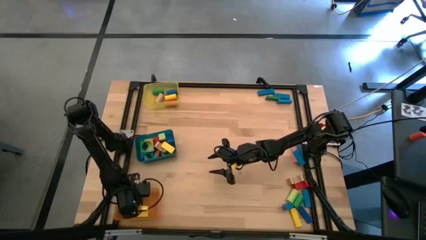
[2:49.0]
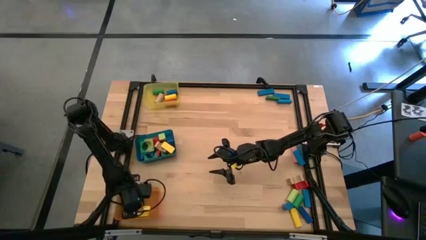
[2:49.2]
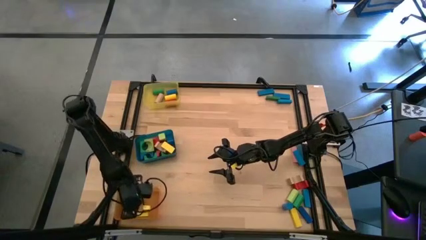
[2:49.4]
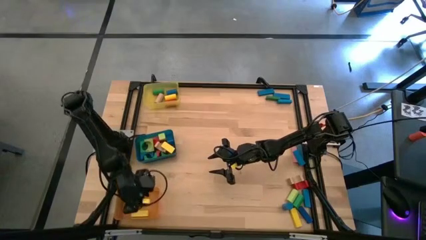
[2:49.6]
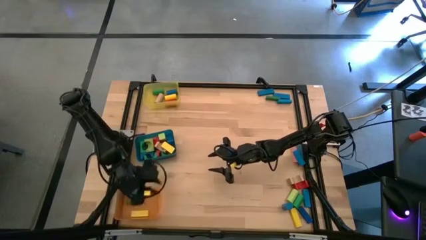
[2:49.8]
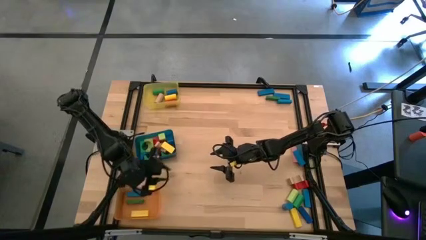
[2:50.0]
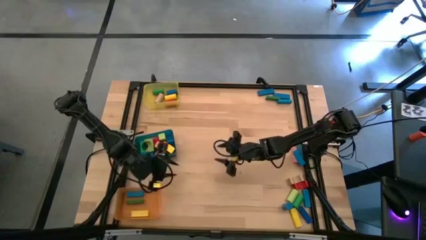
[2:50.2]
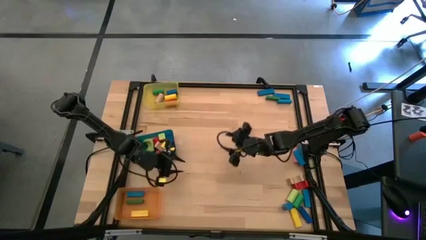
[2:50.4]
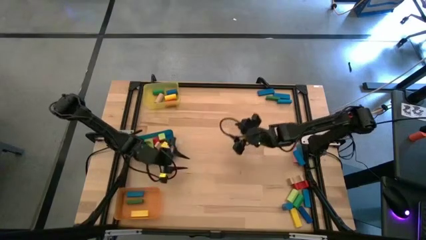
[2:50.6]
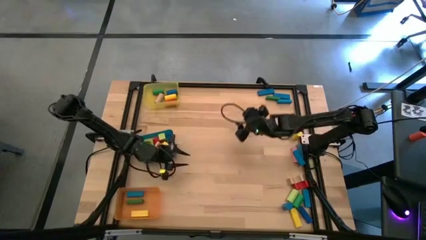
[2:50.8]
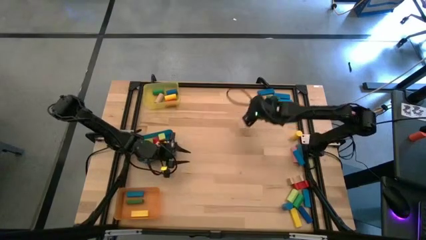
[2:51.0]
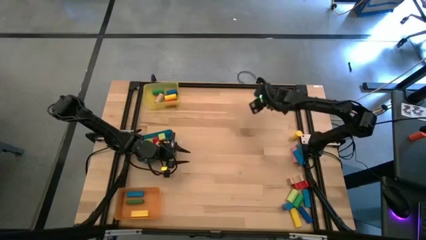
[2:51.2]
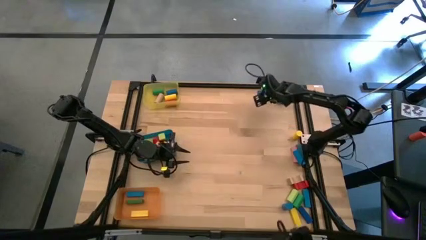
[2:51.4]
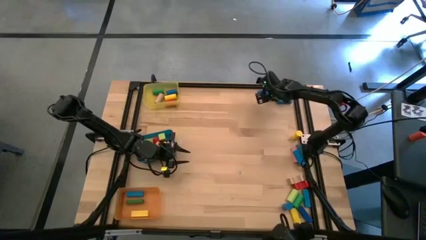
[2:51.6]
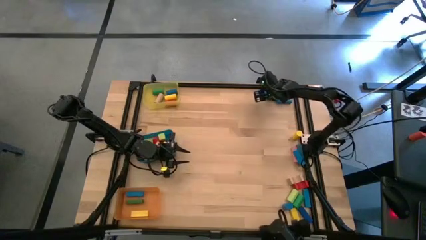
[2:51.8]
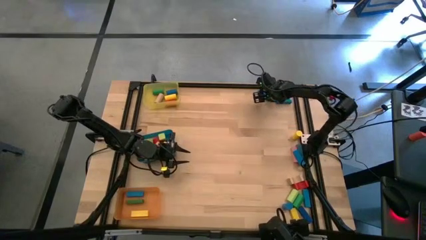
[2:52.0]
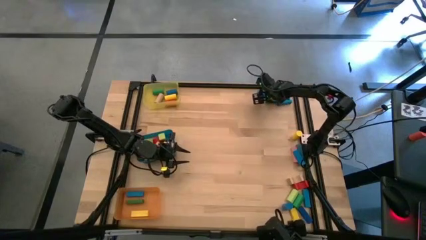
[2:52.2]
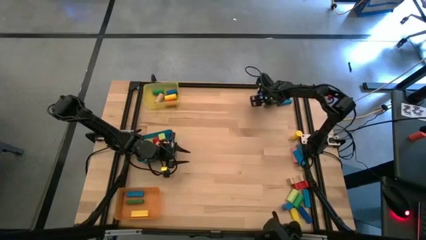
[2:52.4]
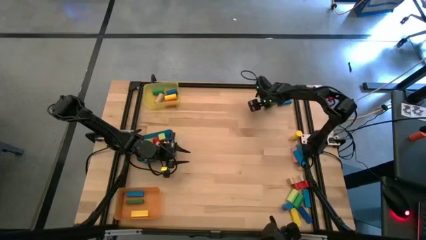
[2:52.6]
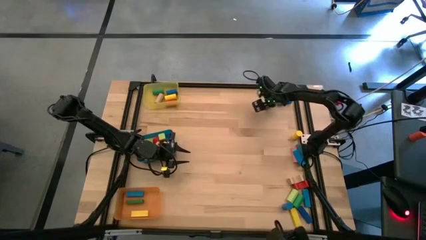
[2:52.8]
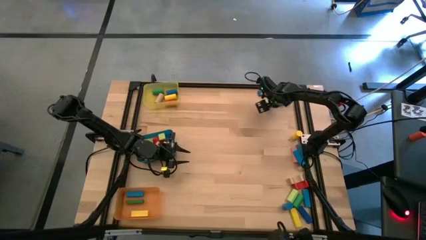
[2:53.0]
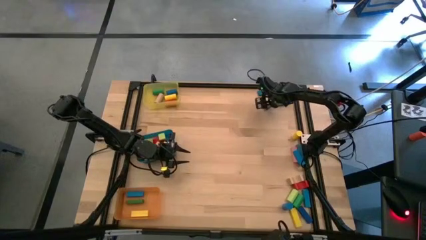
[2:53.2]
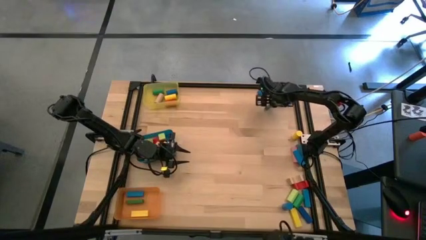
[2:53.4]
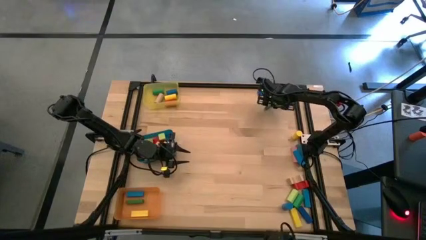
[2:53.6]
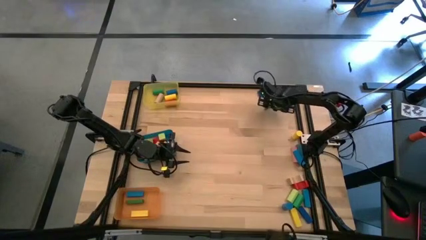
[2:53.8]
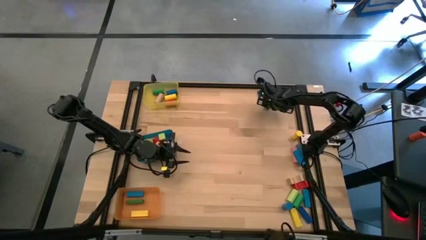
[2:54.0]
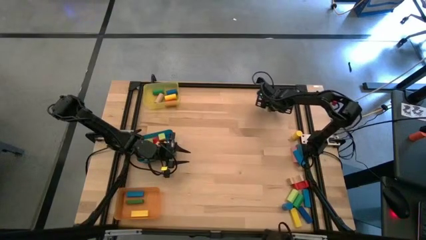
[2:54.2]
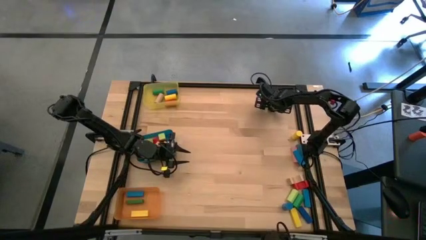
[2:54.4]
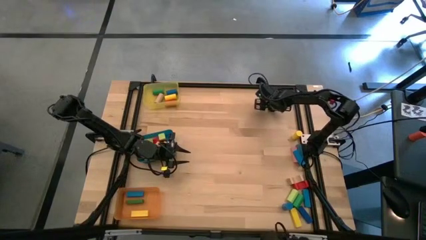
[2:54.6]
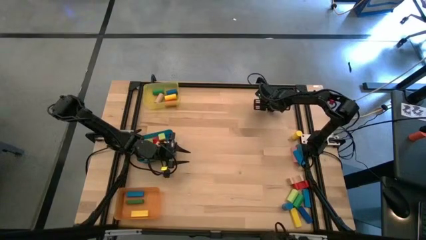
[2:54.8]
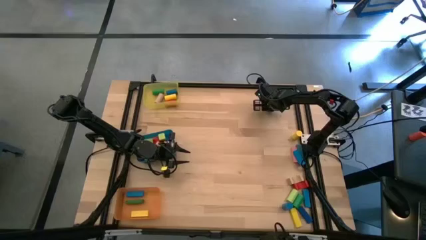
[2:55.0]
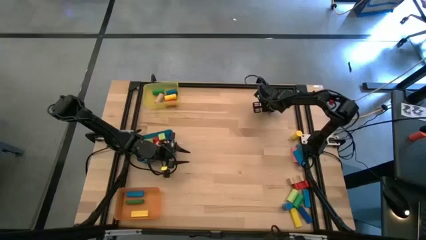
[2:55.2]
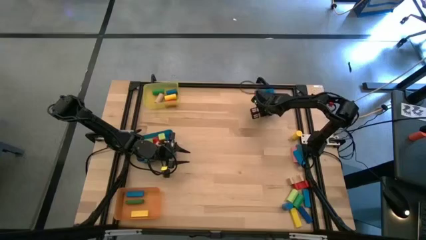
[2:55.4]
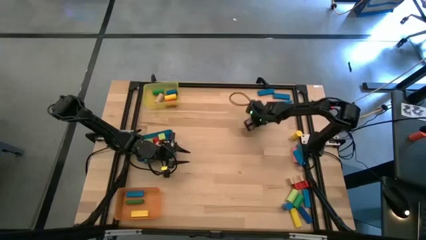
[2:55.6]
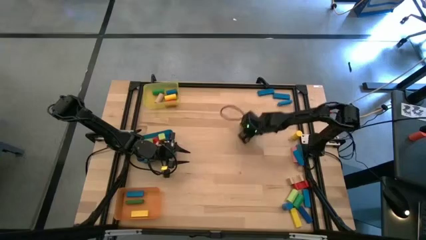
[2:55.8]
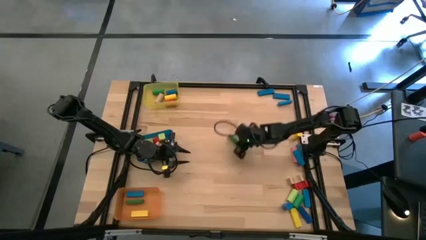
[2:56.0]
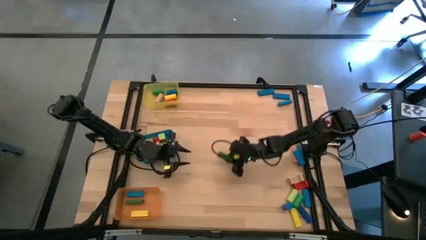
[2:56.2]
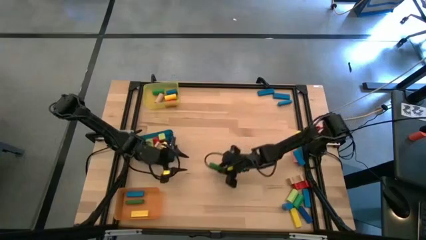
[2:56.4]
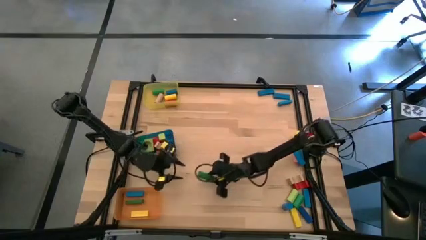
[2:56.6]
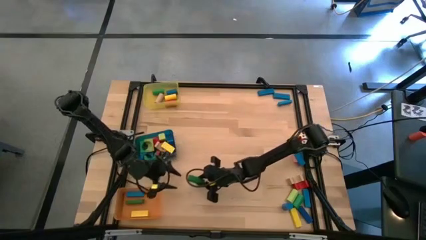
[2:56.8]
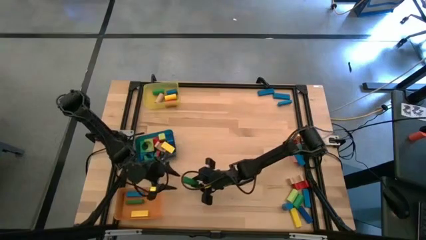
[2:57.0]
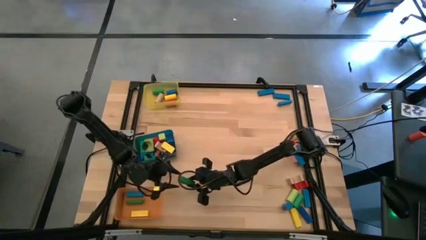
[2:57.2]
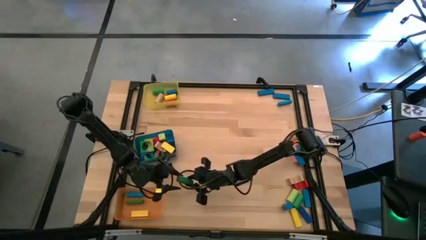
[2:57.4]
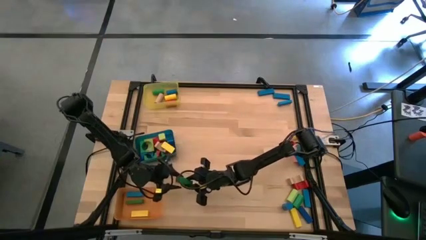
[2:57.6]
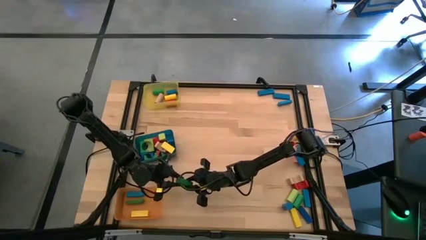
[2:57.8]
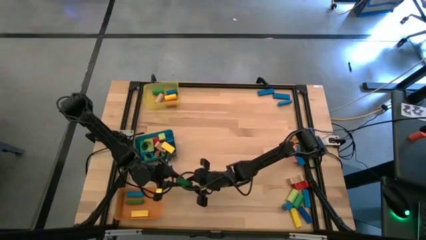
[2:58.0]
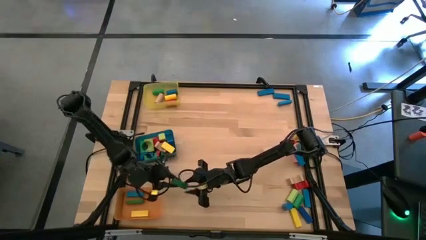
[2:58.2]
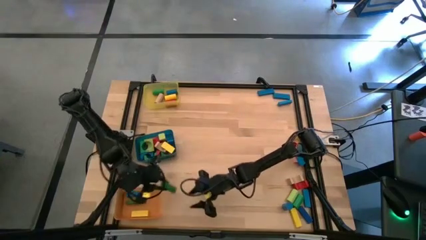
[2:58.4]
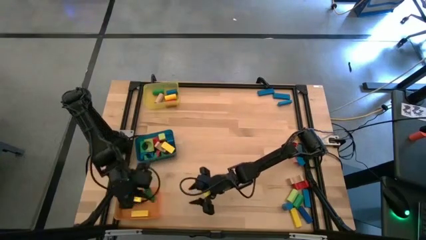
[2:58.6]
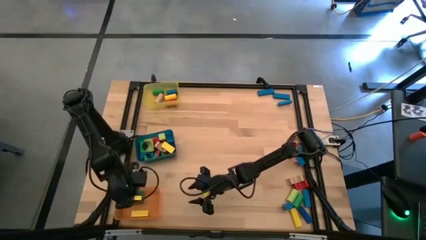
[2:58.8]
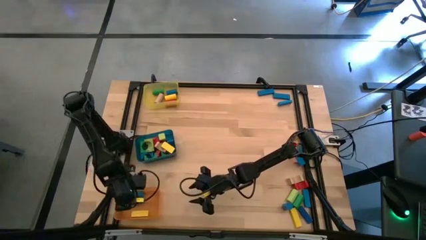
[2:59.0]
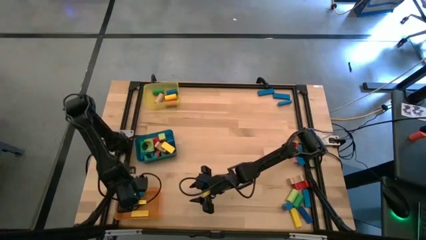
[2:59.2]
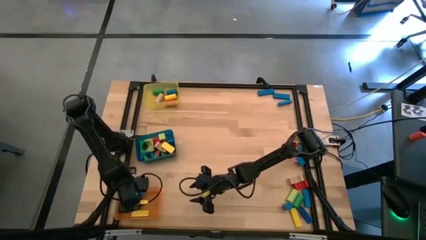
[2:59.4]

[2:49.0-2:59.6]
Task: Sort blocks by size
Put the green block into the orange bin

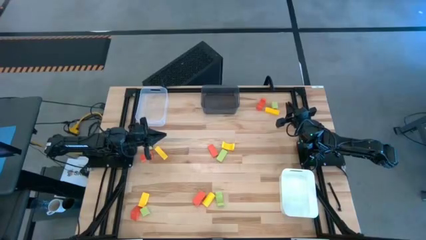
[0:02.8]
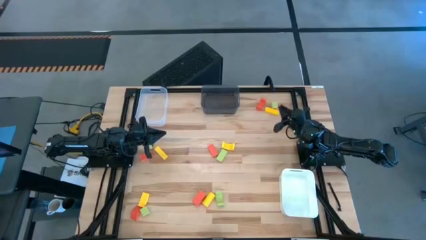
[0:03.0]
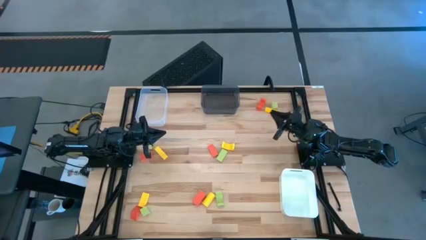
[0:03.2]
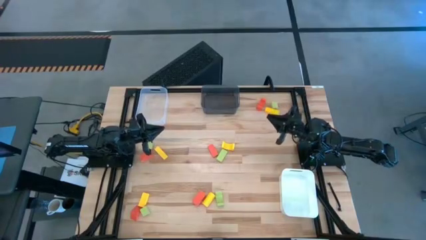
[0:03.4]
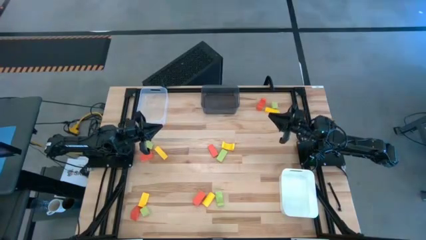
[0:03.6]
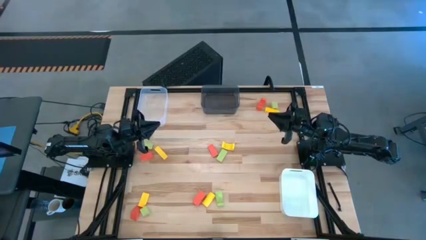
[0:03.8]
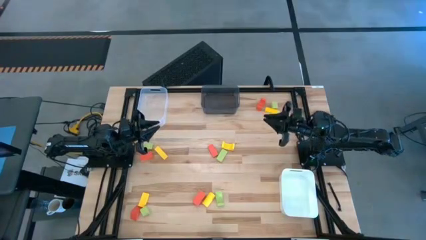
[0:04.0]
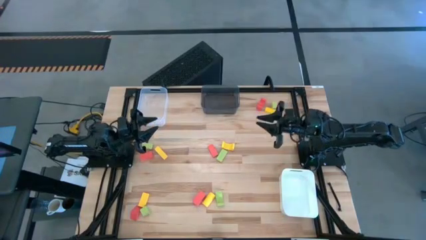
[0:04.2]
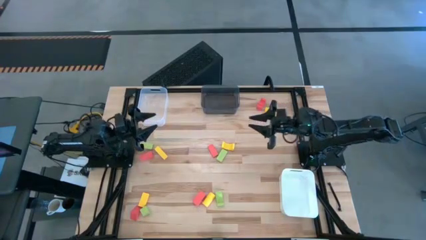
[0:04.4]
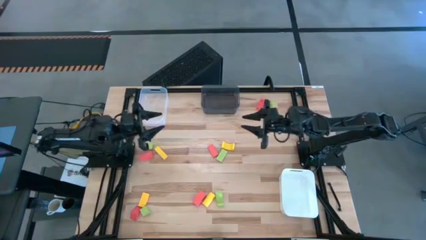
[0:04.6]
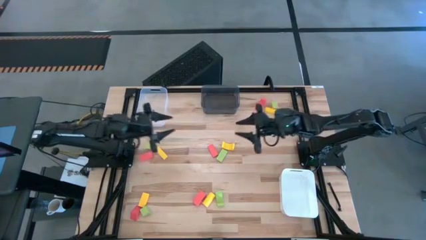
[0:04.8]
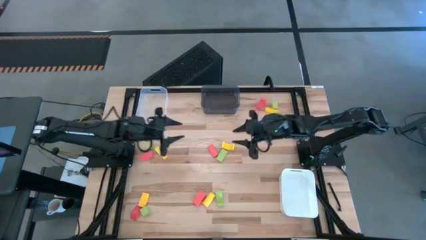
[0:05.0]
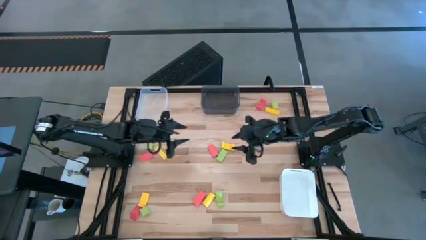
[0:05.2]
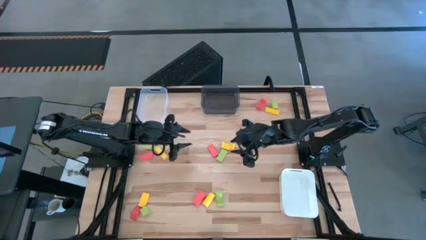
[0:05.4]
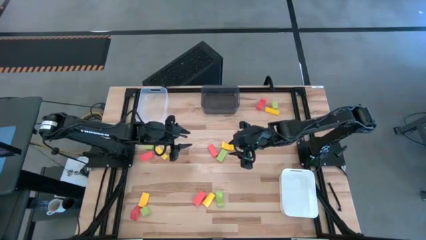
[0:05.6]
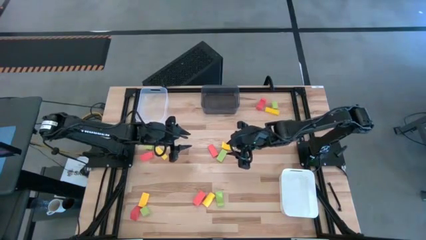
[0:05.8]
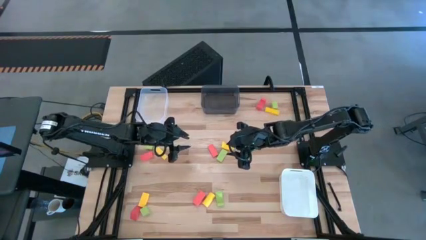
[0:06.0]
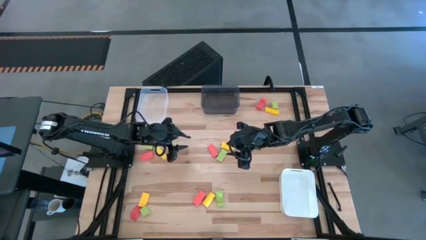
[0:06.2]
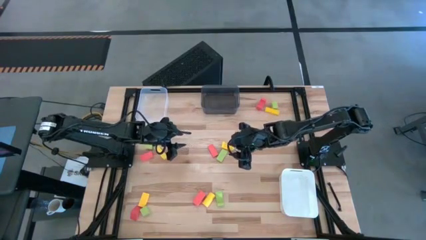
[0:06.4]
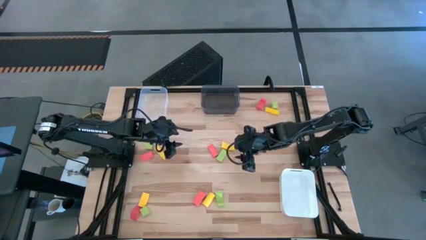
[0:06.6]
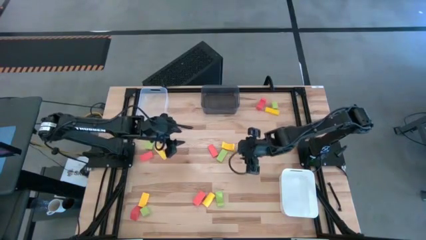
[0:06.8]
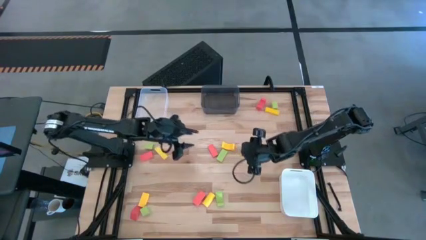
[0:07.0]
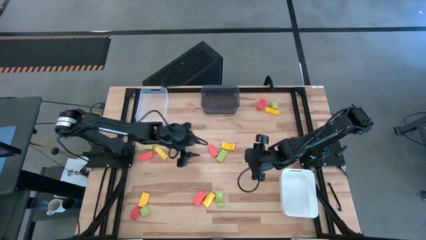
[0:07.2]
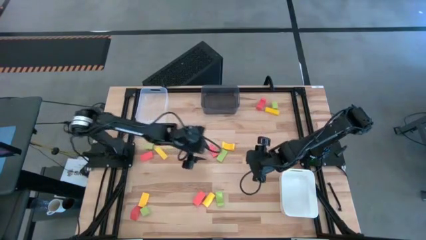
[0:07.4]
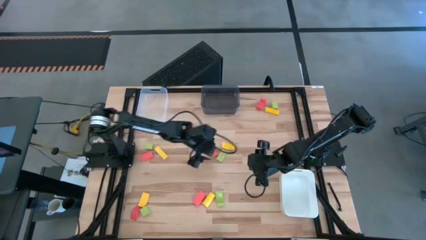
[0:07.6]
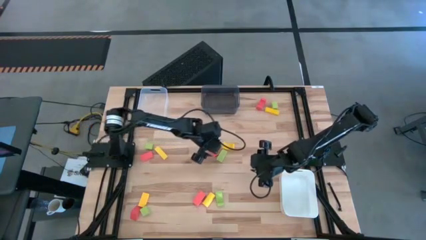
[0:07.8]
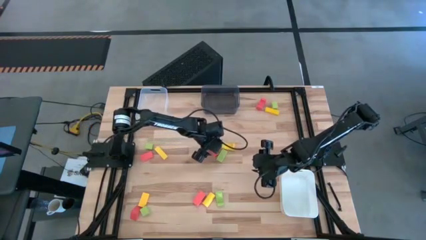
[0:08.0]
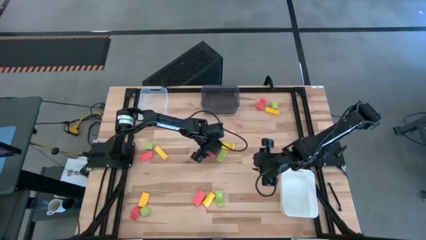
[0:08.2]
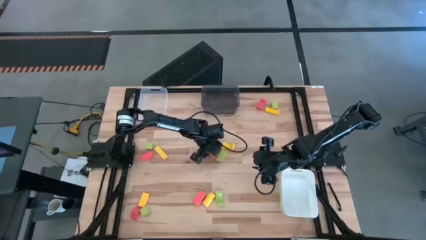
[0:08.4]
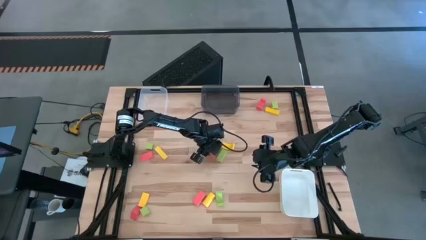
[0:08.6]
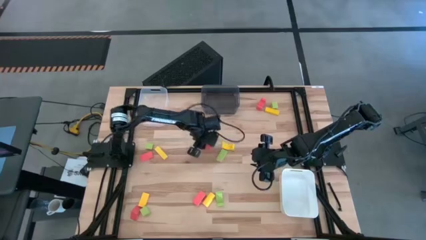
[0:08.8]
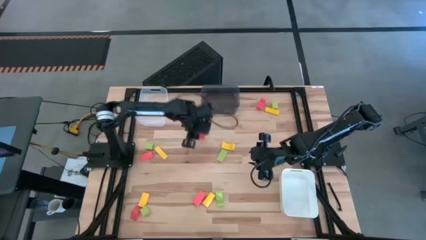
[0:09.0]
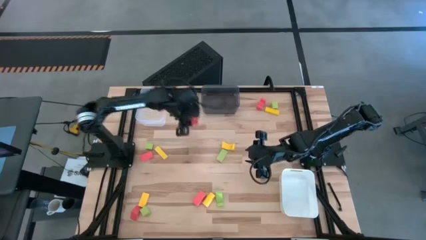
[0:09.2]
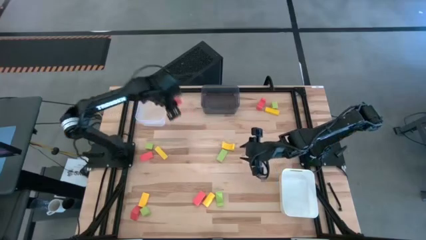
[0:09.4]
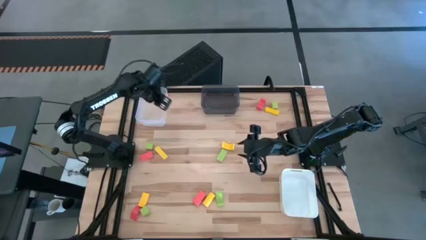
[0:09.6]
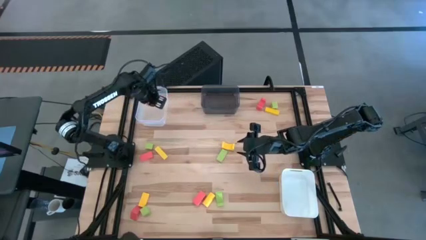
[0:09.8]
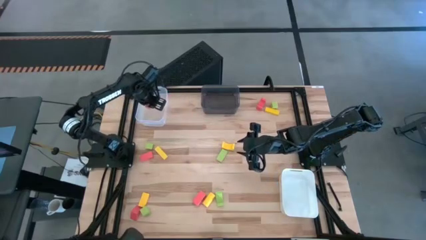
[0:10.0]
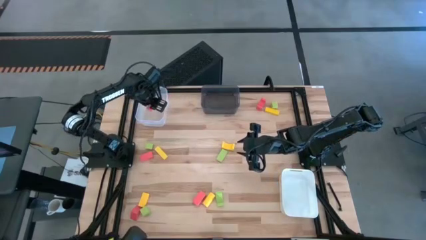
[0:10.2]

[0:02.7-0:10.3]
Task: Sort & place blocks by color
Put the pink block into the transparent bin
